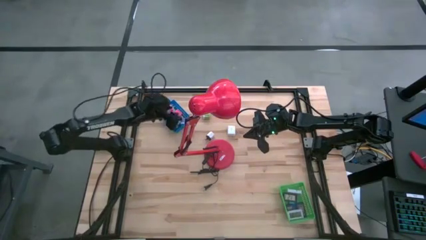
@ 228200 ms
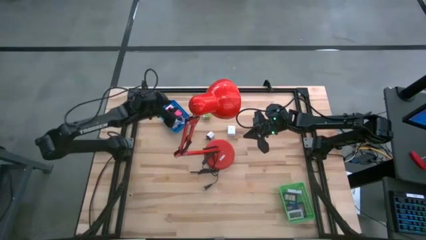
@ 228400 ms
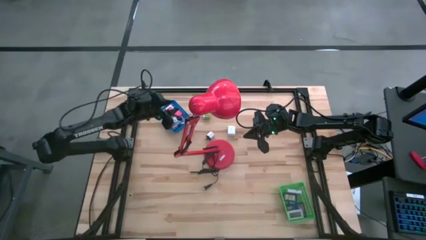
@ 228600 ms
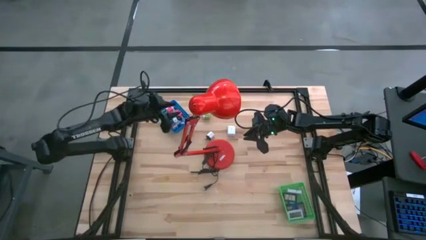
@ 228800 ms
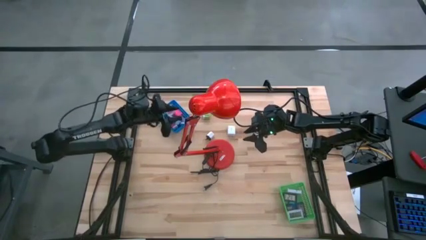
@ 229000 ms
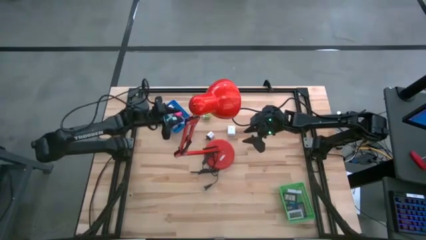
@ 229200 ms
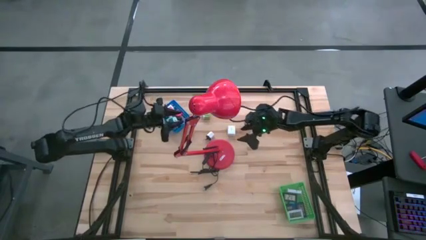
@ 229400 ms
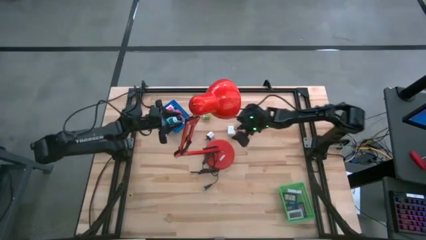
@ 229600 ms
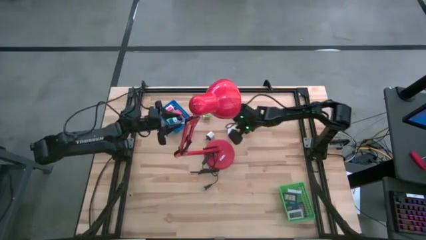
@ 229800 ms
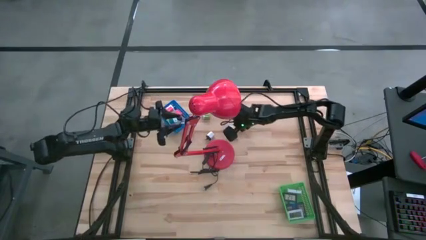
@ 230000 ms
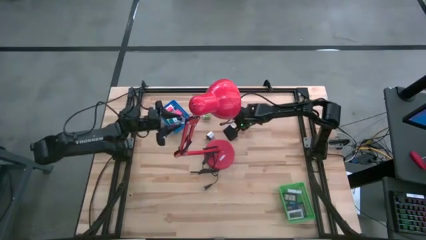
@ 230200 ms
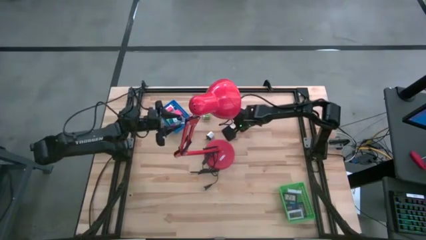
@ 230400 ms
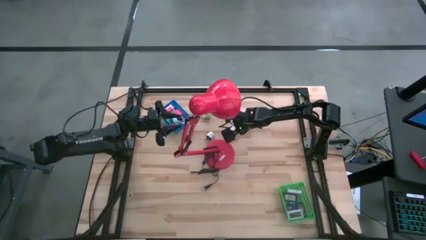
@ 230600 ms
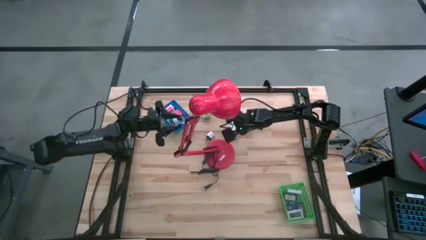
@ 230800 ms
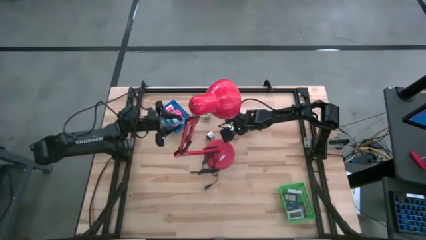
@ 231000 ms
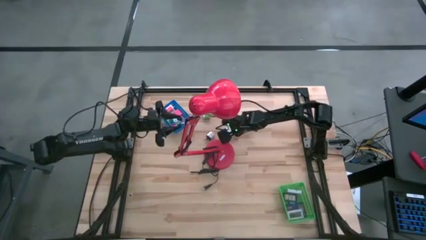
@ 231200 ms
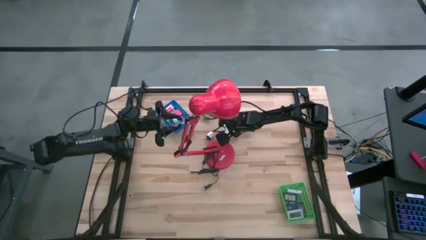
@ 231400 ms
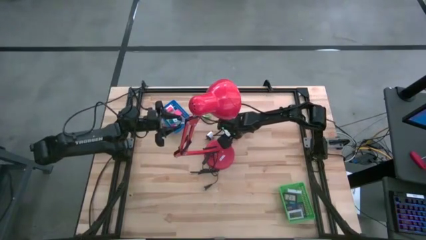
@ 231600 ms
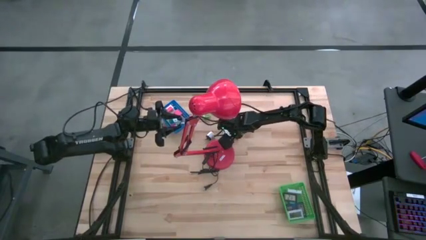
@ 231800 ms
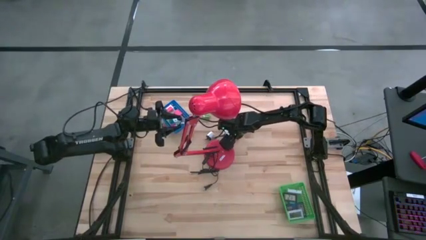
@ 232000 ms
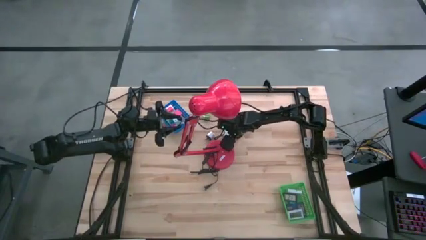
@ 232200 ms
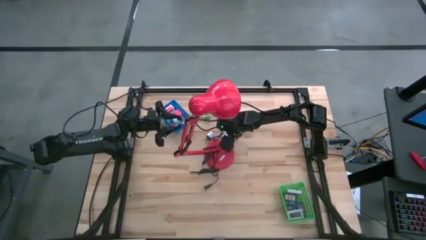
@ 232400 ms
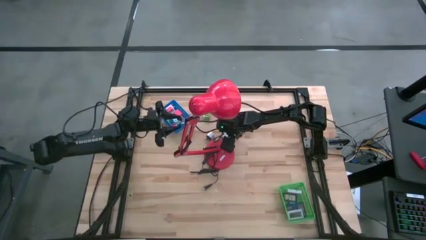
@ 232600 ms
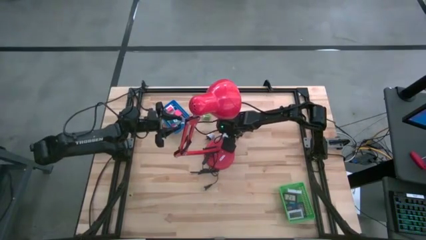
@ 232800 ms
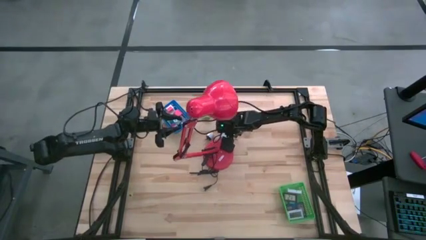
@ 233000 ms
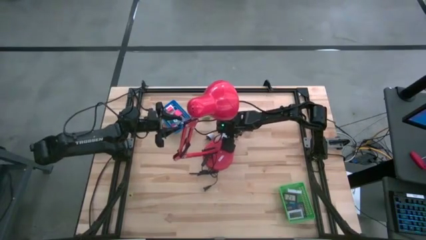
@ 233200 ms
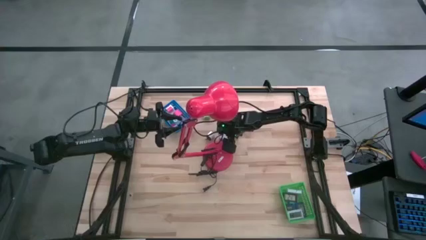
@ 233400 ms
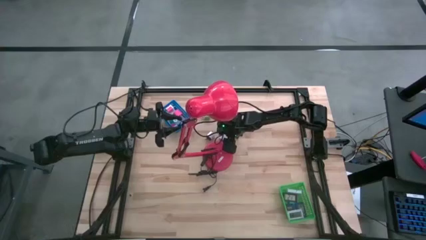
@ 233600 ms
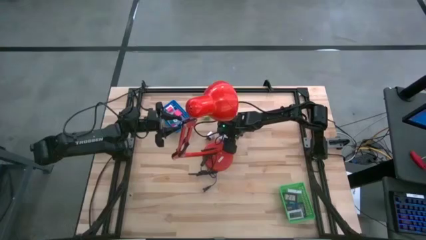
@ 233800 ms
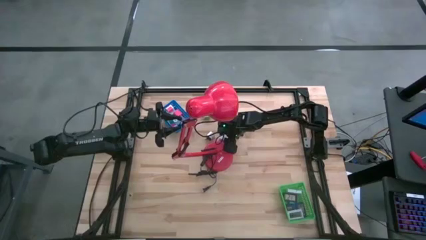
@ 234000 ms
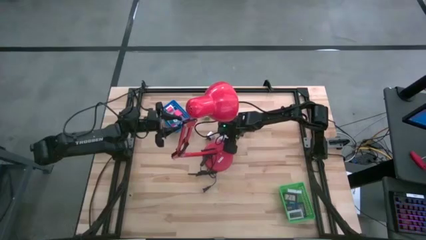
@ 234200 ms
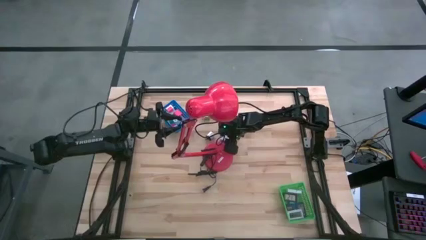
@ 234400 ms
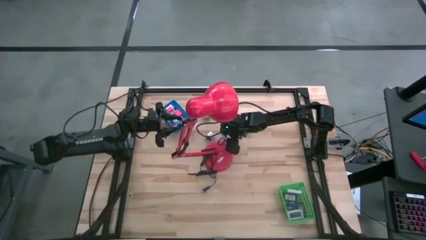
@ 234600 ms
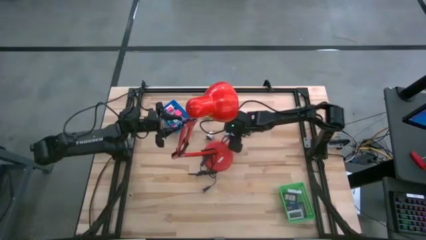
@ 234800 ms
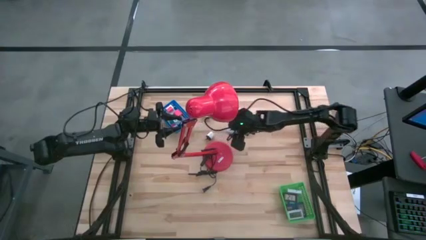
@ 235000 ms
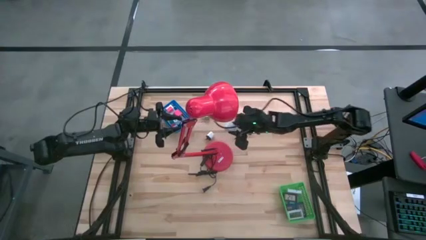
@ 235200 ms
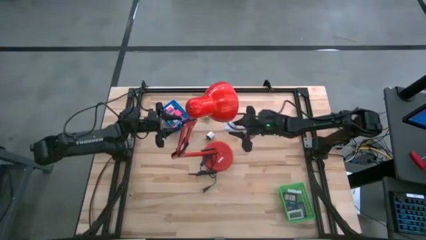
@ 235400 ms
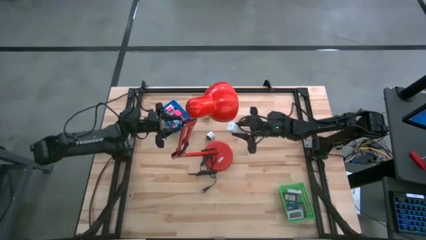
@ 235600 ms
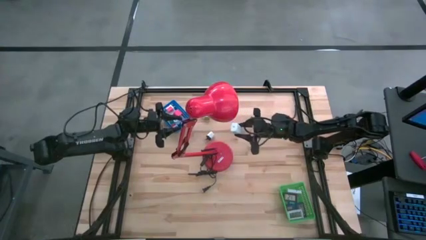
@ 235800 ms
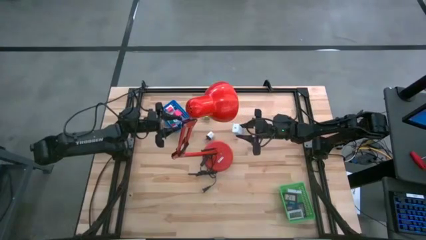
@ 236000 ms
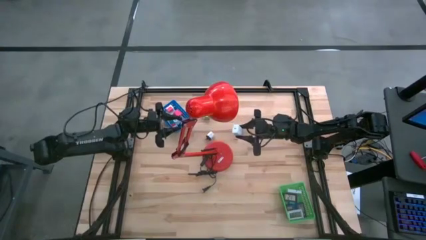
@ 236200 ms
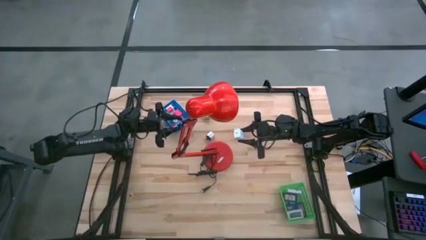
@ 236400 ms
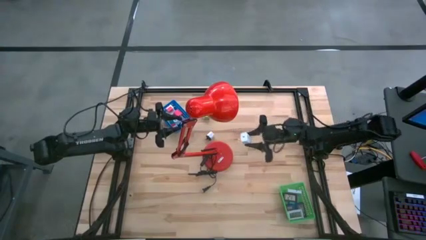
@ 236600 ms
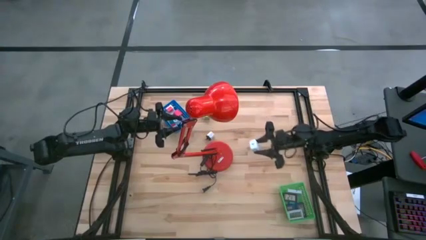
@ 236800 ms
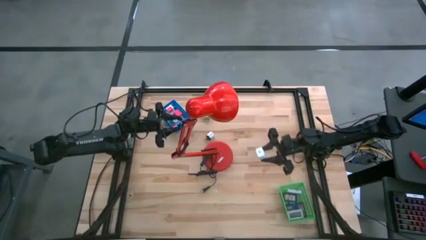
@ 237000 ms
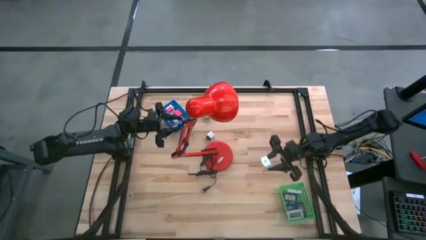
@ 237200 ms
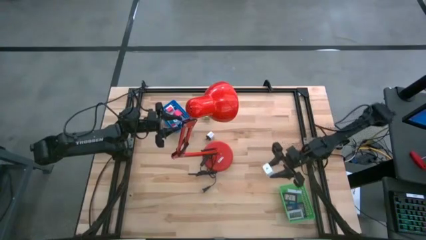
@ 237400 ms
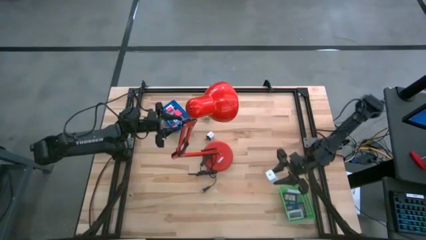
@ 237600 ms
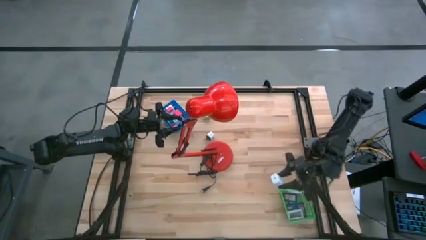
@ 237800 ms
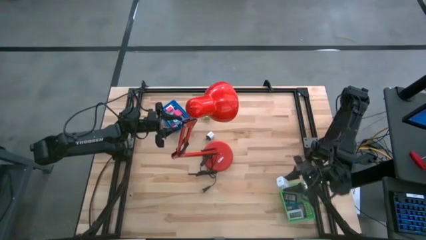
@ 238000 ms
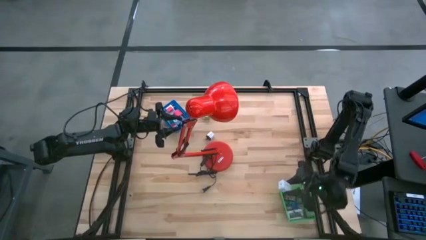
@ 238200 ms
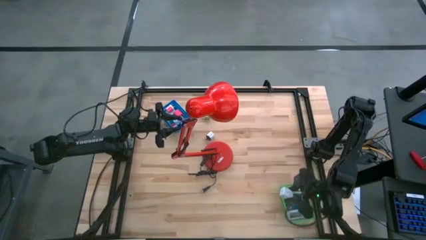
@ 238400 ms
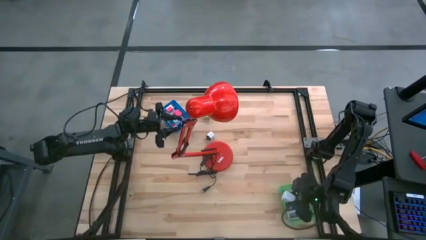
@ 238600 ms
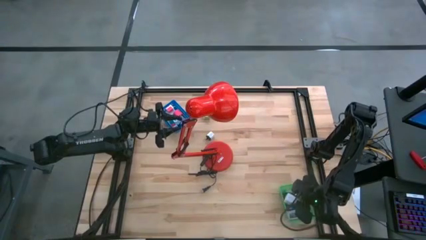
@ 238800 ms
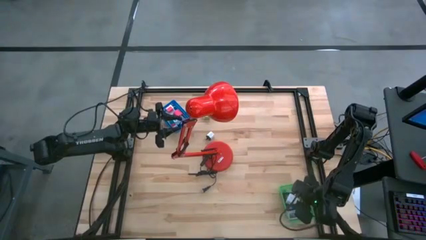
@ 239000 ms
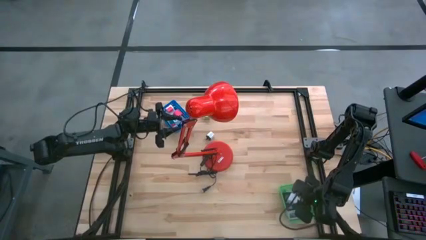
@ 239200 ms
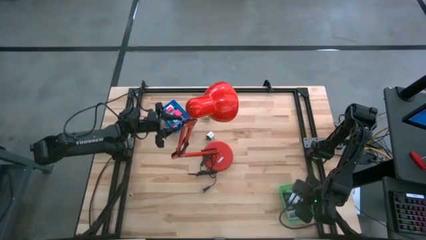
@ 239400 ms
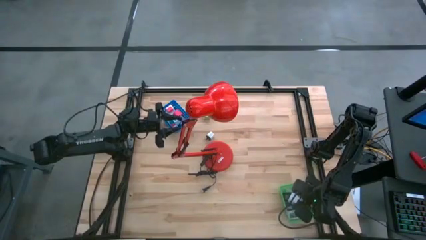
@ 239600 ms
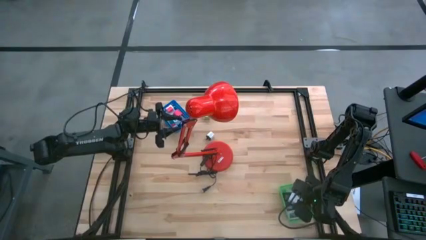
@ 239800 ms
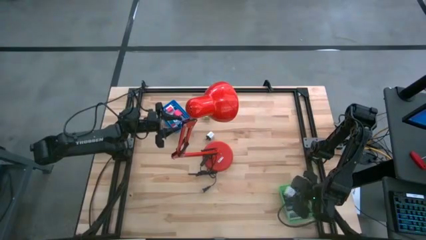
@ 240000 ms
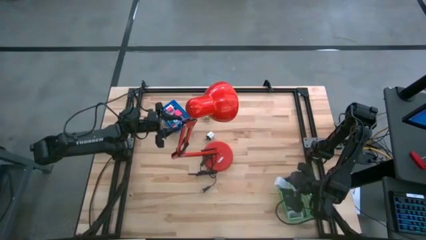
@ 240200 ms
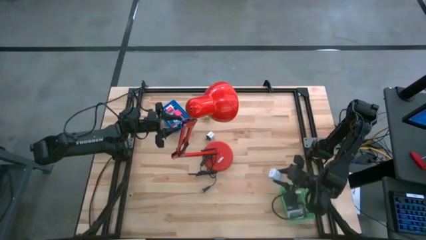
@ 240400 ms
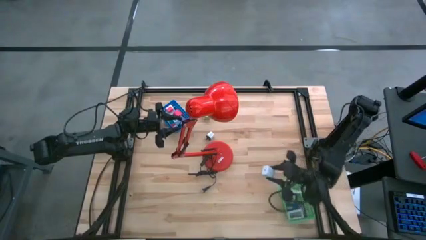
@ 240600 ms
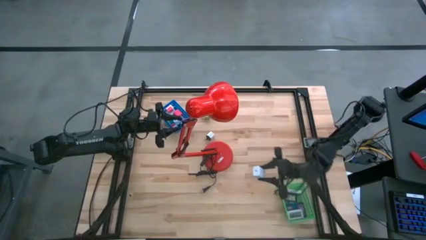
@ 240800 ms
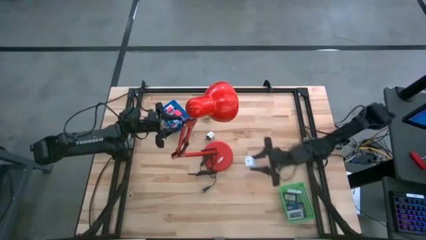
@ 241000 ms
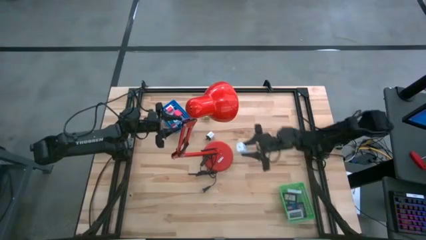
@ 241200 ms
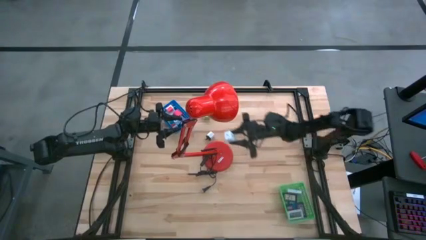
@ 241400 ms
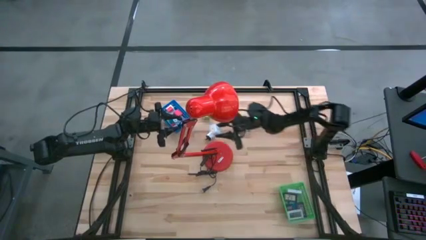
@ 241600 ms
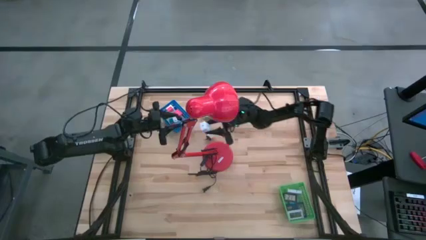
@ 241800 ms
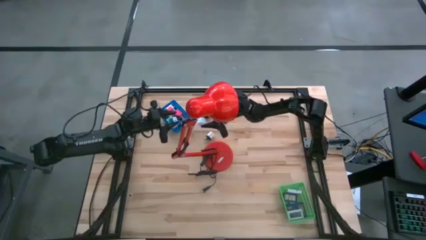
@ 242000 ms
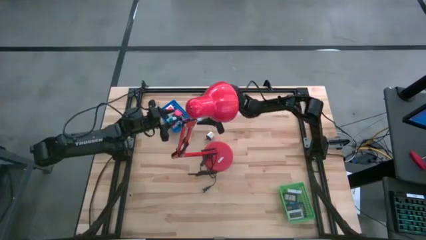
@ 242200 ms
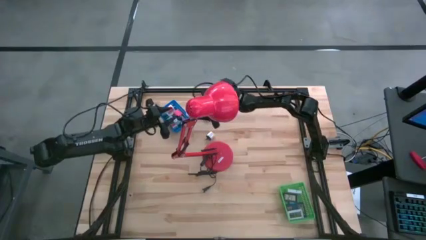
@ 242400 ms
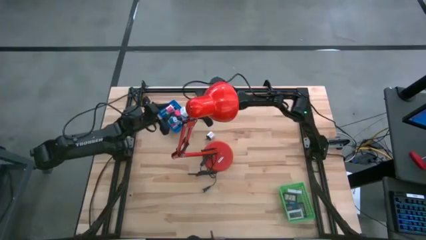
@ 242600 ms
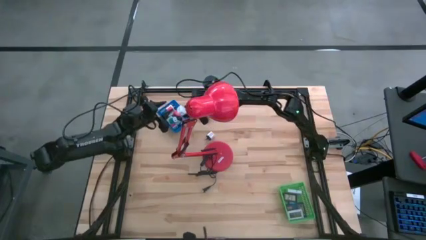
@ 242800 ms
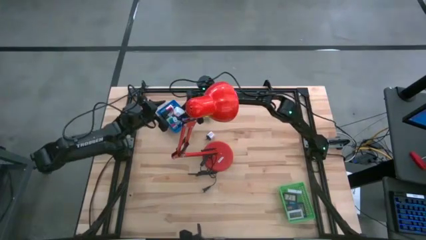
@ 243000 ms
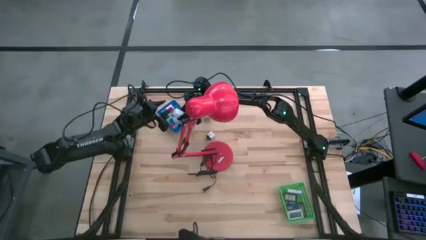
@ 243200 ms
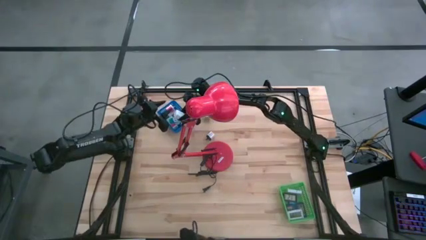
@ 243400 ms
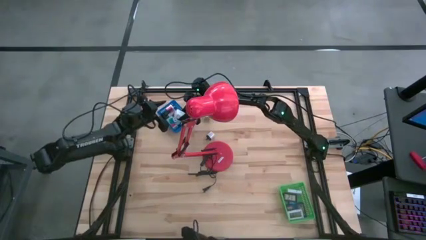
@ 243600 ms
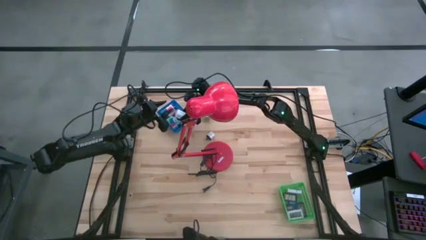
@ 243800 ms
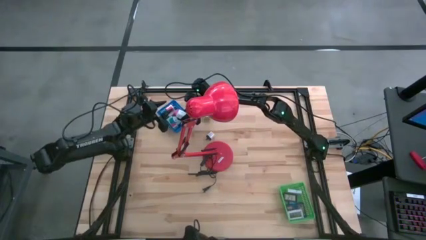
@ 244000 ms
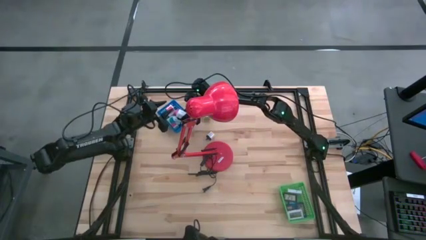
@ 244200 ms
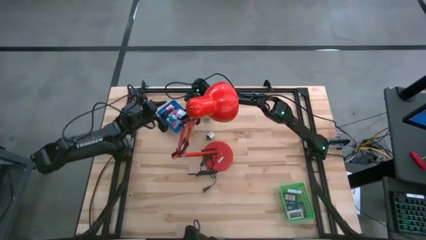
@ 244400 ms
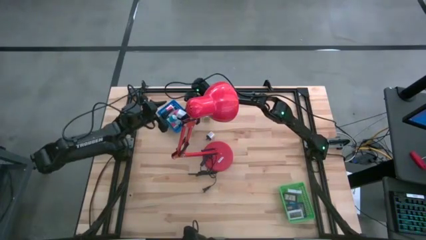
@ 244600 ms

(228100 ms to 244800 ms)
Task: Pick & Place Office items
Put the white charger adapter into the blue bin
